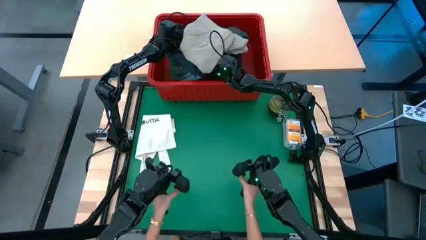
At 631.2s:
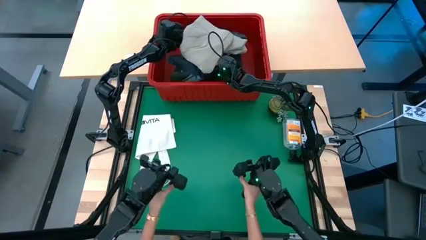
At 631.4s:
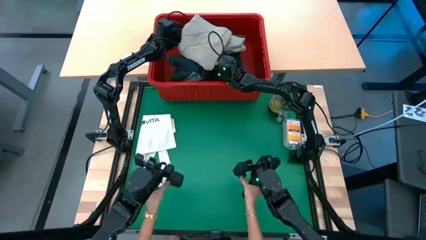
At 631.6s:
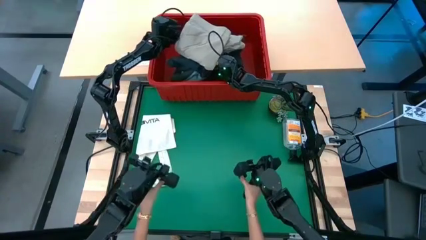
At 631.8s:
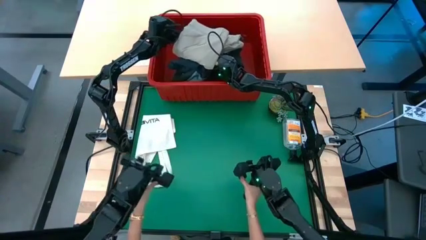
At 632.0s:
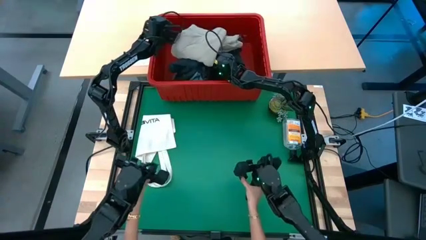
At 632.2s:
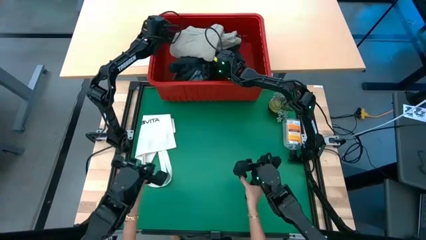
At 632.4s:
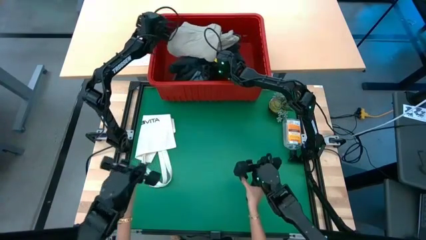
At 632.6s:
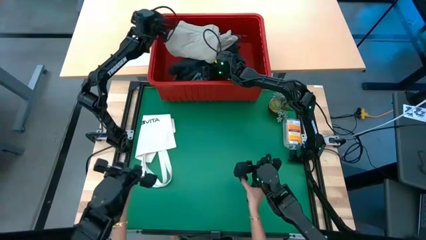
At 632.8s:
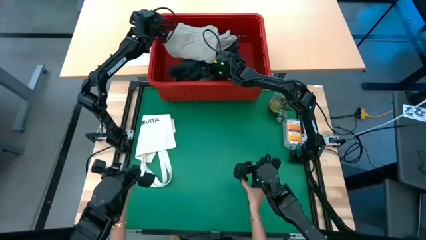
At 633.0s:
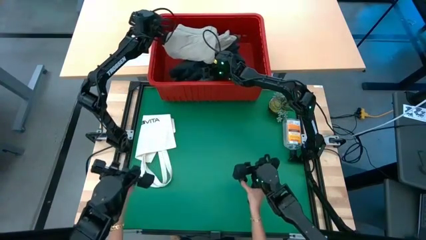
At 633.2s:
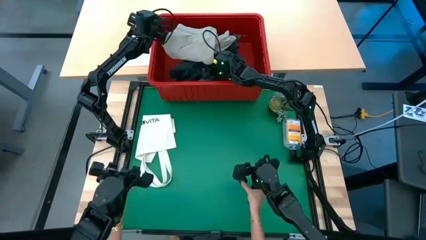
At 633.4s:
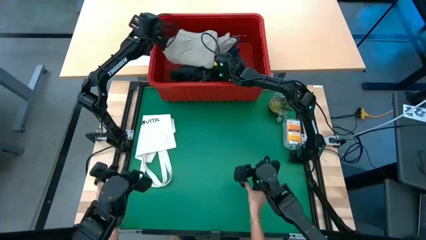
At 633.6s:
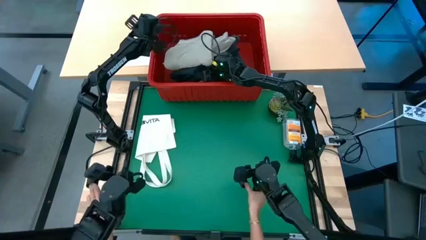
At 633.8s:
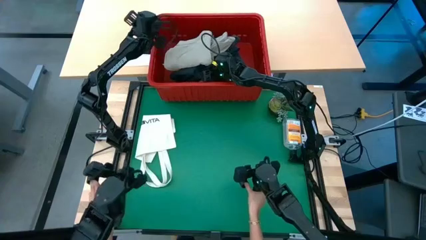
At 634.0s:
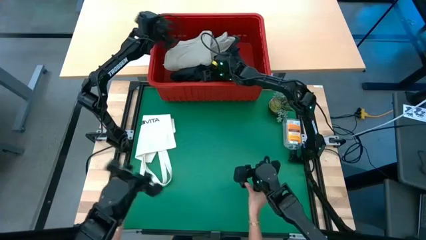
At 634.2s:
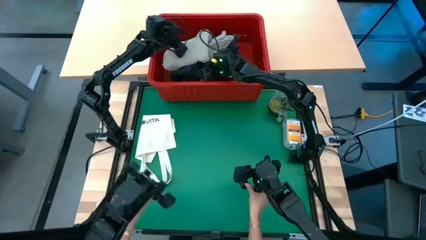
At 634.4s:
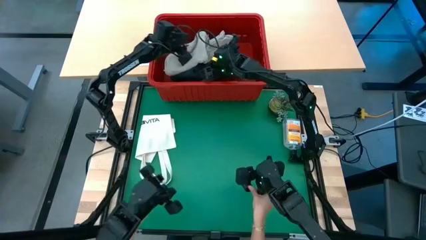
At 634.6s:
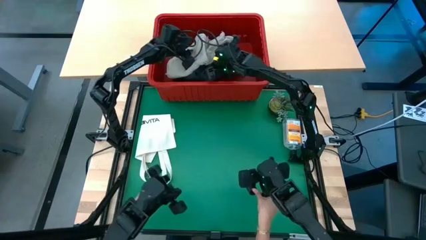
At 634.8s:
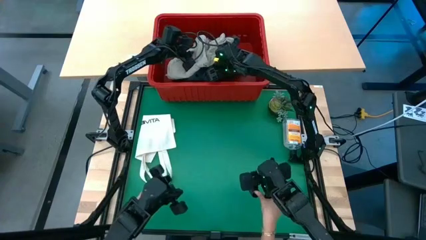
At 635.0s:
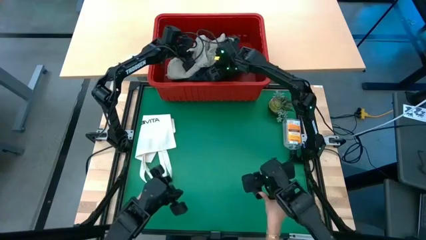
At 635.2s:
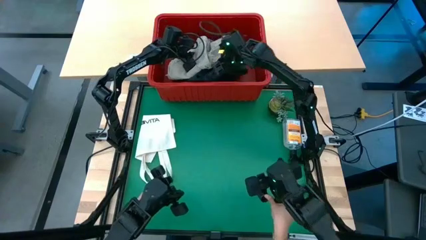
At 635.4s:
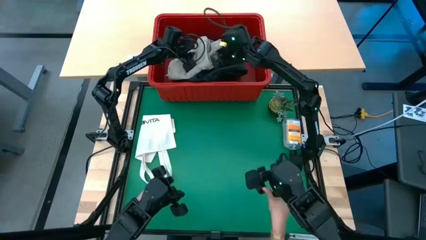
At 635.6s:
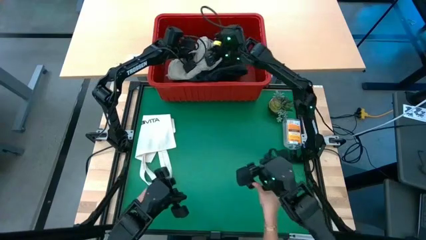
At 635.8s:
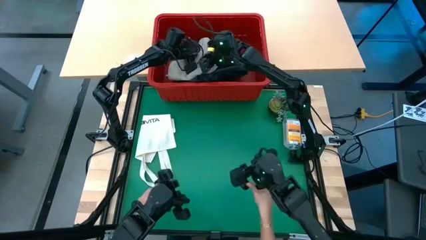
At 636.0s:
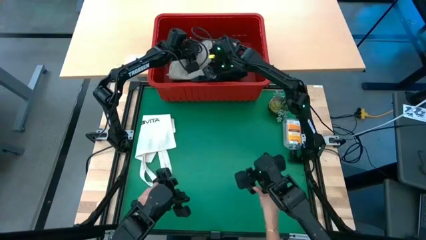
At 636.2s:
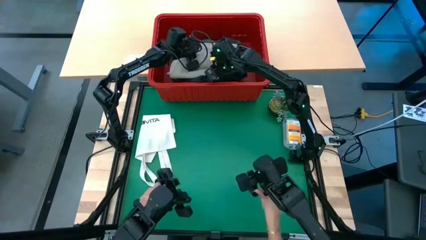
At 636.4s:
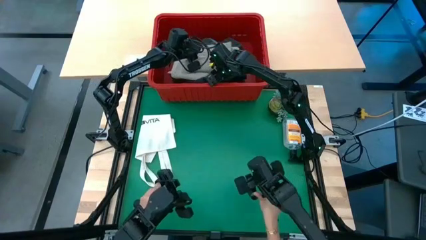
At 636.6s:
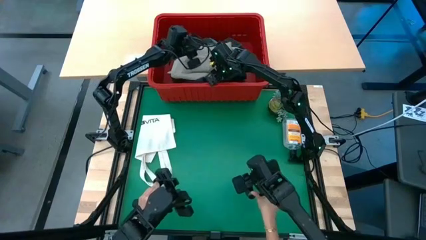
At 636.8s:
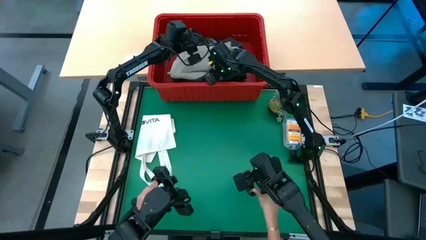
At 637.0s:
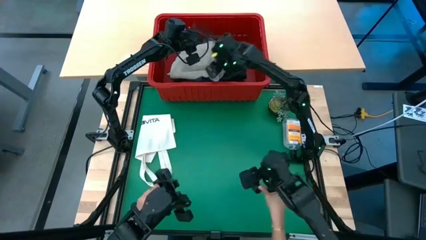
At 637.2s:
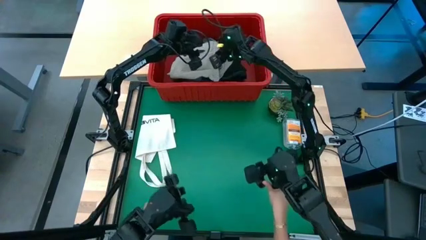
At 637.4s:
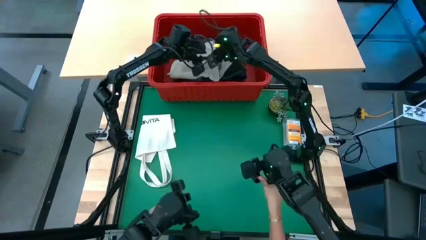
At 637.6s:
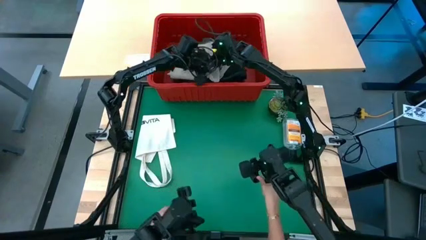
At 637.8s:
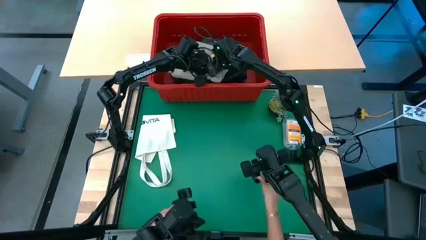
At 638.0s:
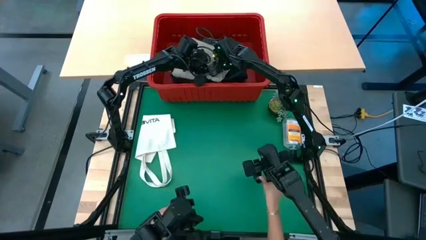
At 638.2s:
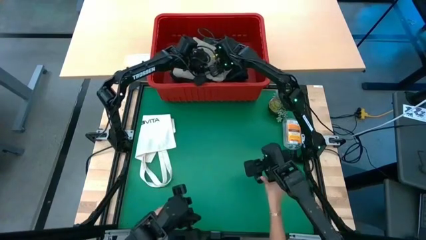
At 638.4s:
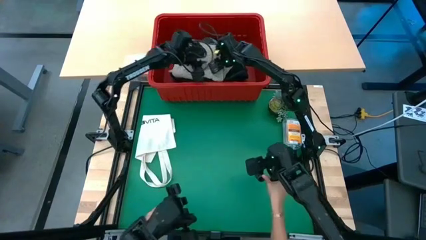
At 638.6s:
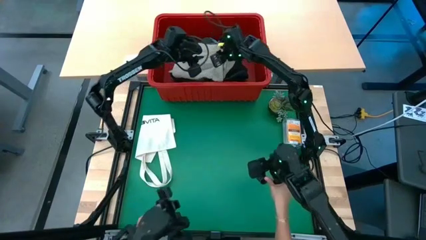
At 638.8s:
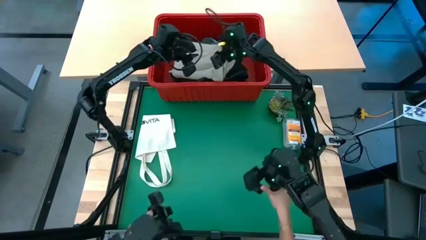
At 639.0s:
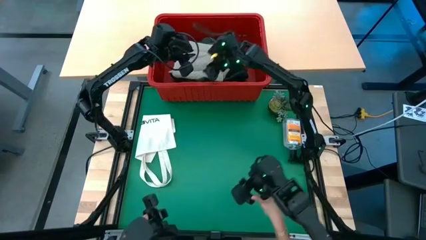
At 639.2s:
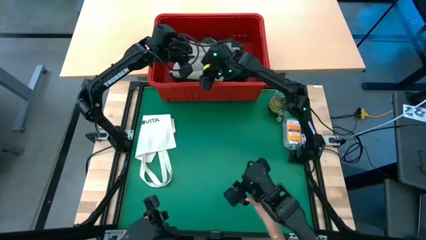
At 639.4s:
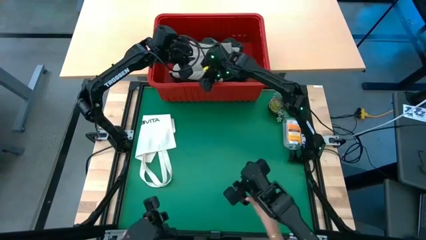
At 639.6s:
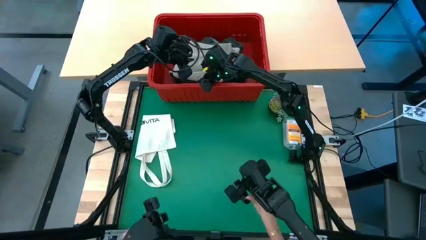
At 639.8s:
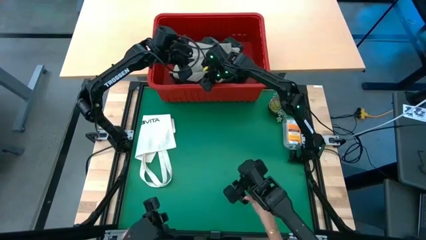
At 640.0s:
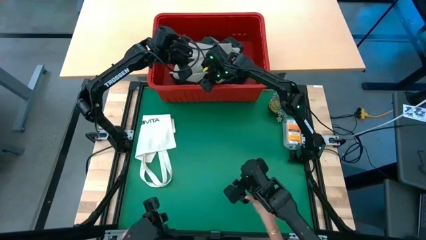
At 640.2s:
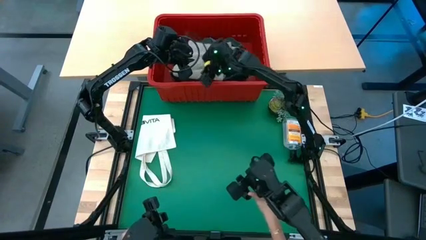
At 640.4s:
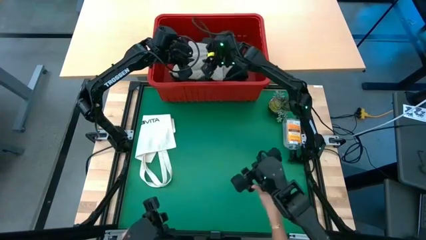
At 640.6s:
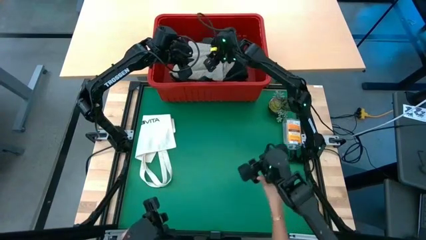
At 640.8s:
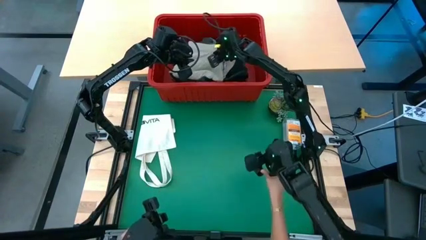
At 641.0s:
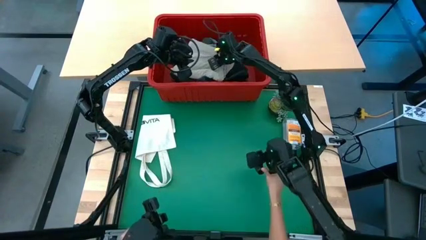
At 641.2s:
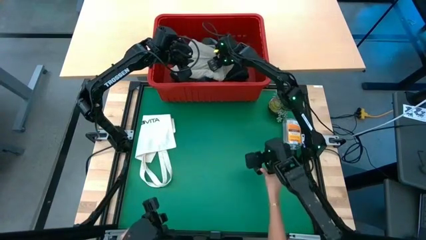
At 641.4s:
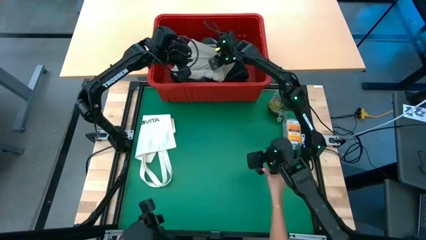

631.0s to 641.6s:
Task: Fold Laundry from Bin
Put the stacked clothes into the red bin

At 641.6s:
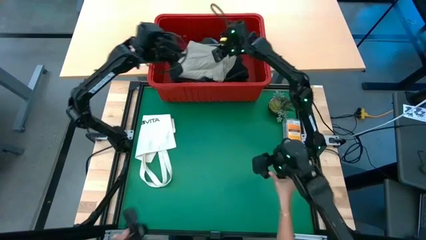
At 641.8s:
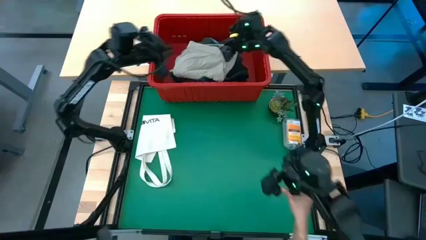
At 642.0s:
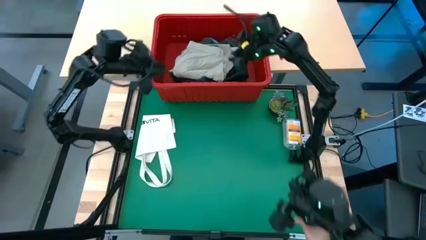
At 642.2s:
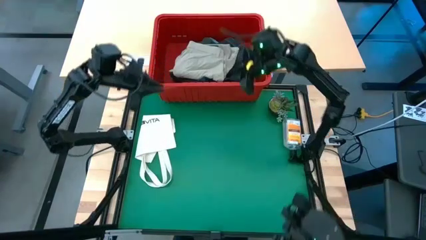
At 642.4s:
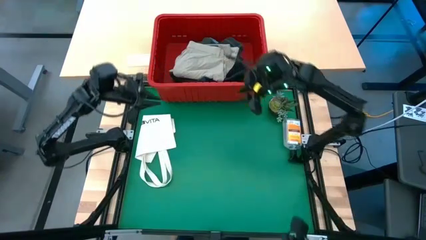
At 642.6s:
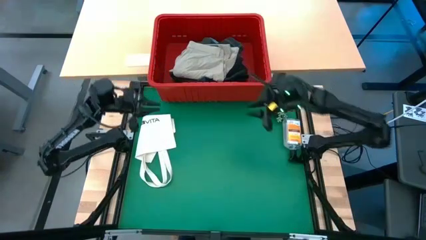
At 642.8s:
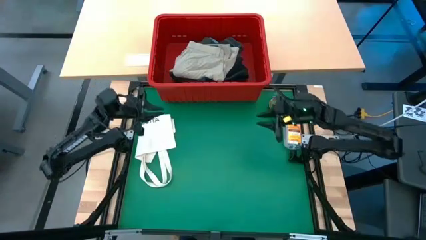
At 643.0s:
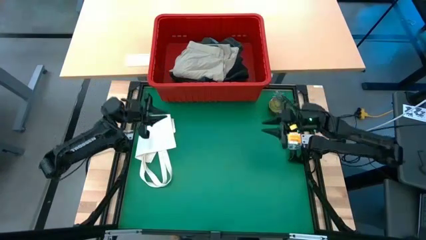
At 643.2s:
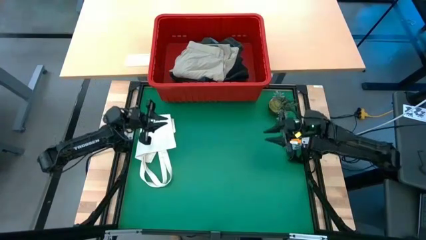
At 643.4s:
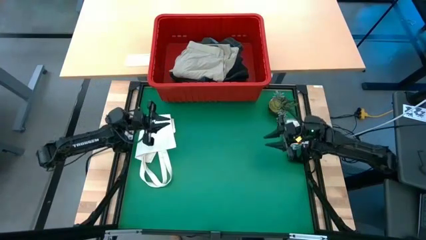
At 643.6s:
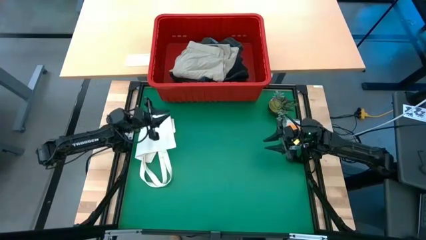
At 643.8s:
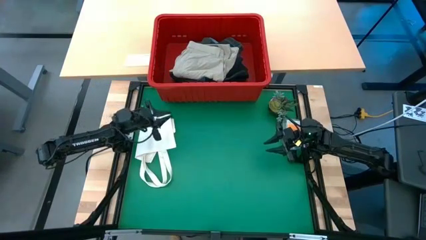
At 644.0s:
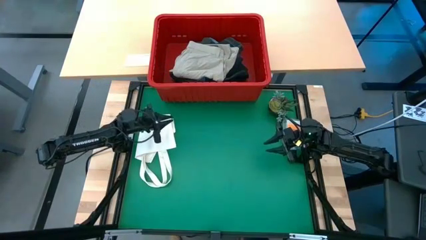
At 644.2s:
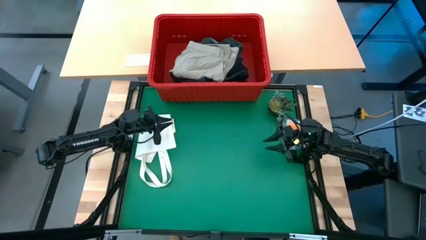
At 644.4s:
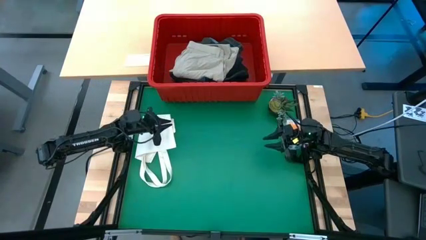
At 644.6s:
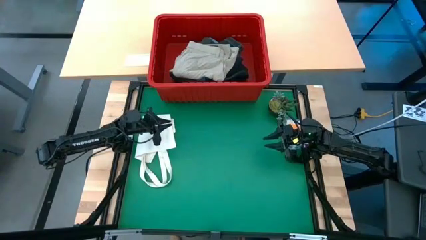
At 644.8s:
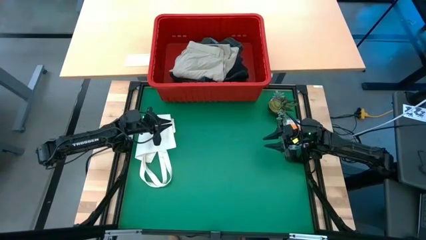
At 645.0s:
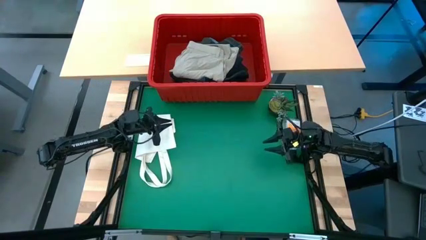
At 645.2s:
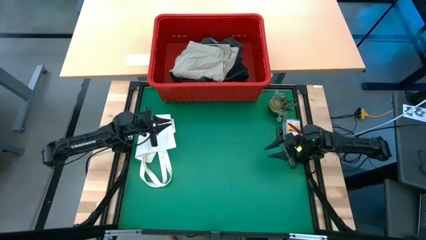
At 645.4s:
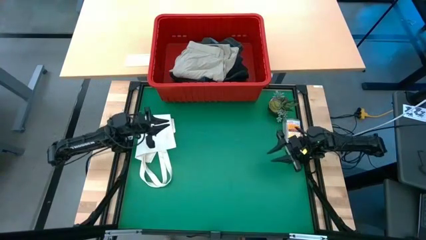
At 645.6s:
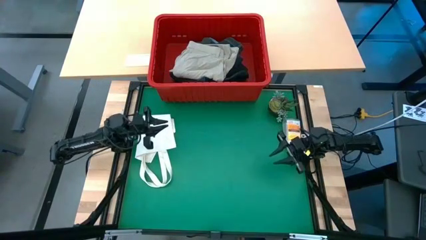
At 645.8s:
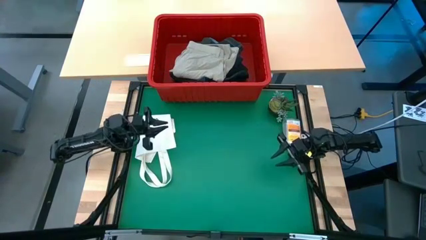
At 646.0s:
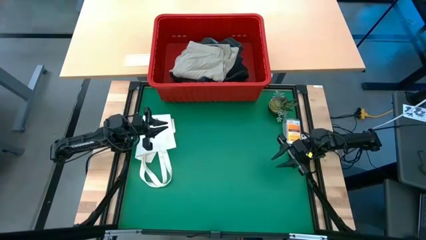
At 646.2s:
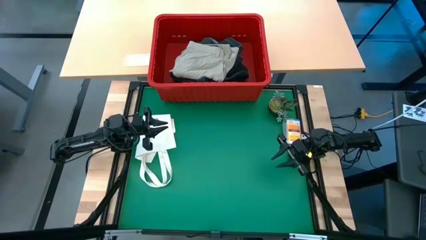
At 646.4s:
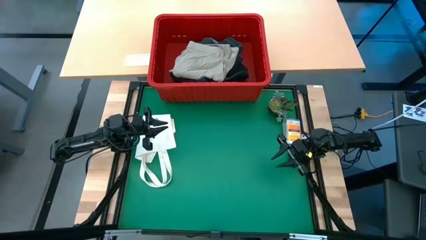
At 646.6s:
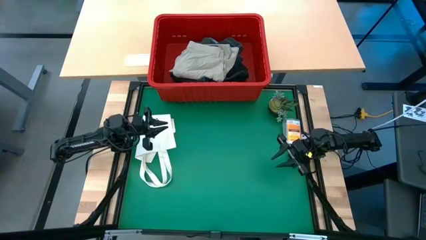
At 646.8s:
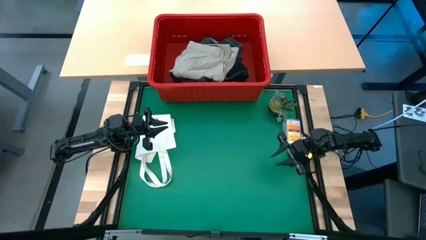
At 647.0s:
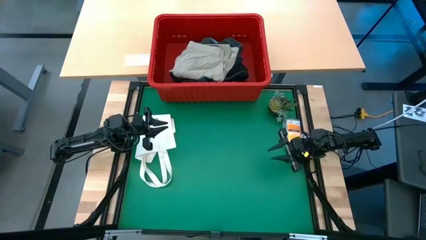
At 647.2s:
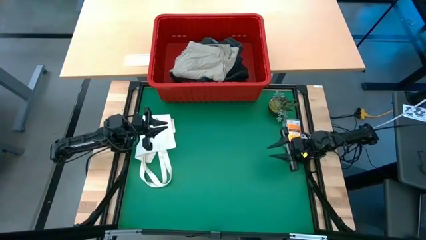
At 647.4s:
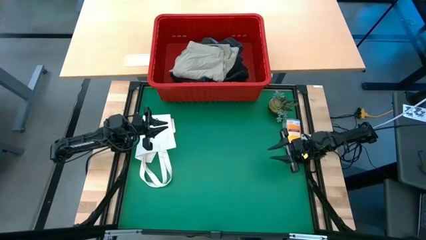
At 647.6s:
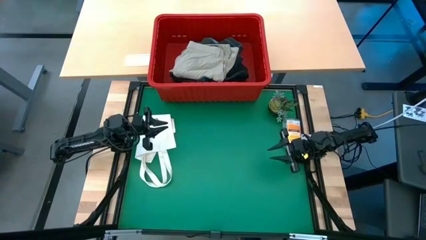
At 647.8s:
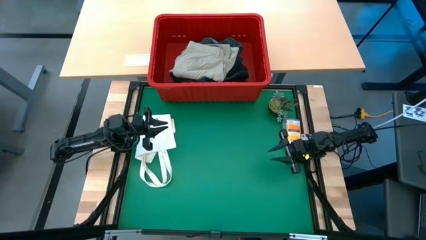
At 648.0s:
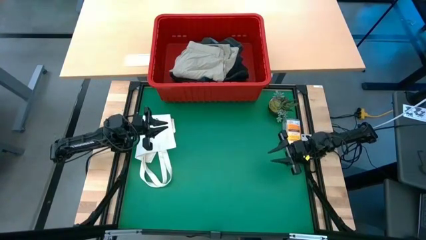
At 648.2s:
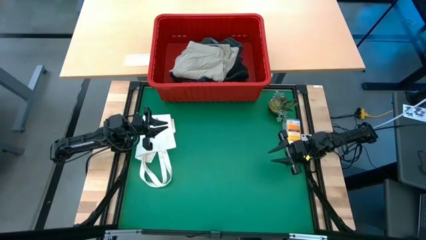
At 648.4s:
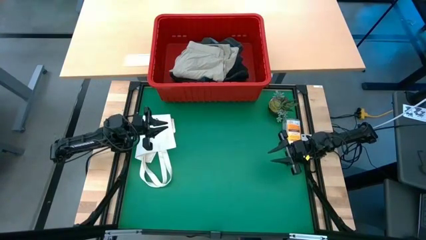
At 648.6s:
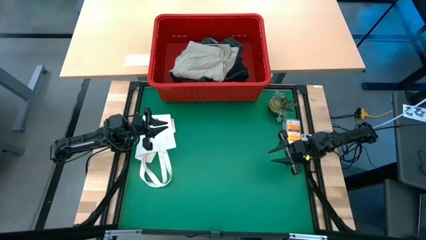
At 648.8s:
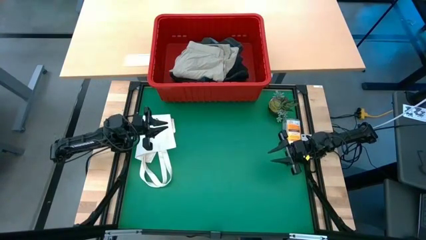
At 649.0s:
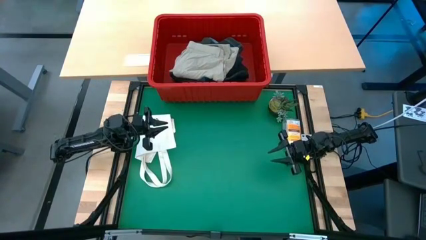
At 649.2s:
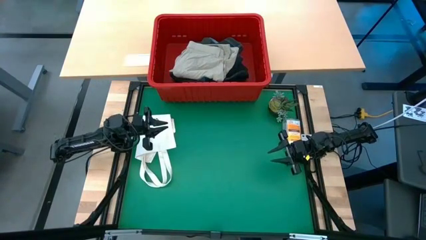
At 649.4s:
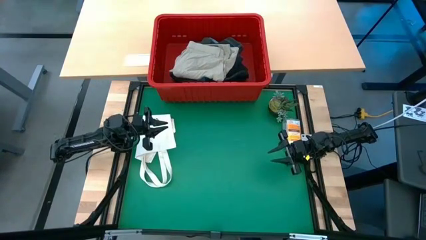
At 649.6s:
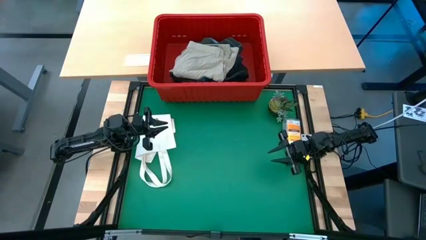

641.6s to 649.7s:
Return to Home Position
